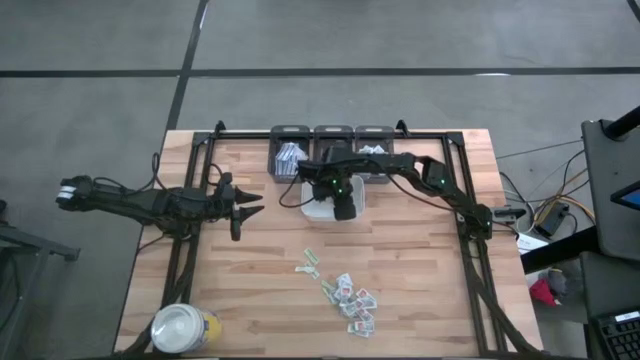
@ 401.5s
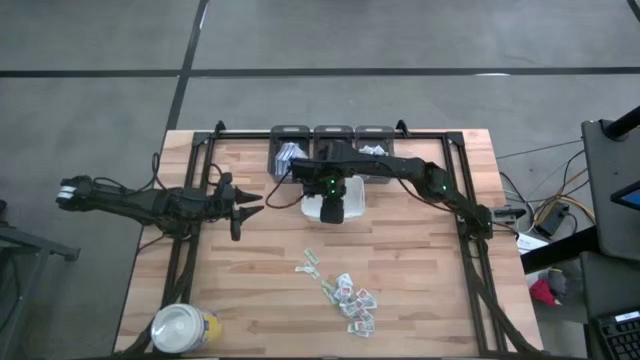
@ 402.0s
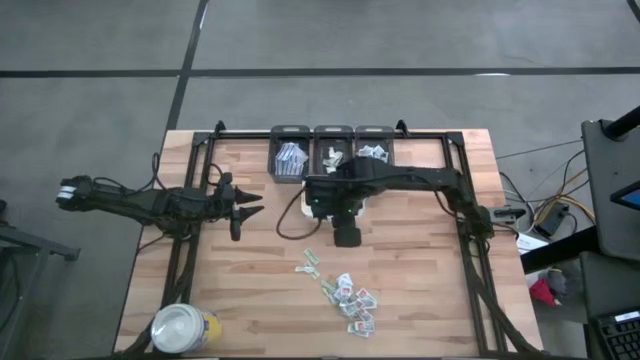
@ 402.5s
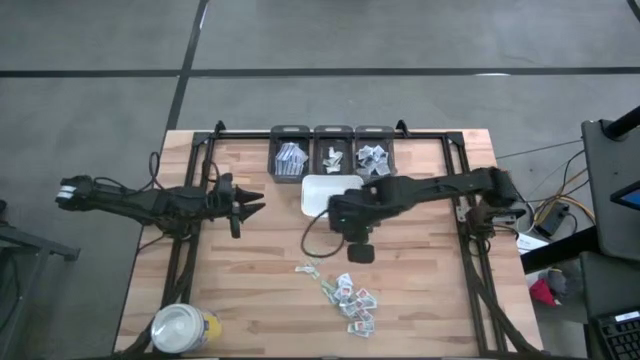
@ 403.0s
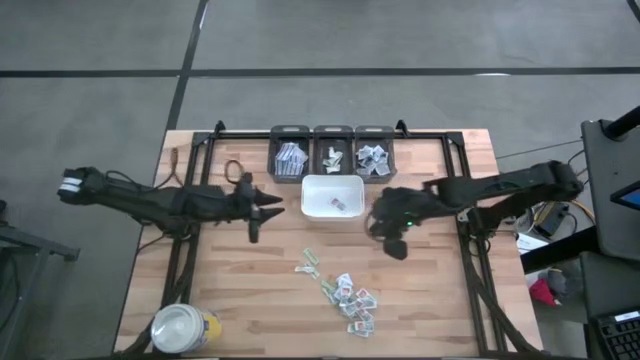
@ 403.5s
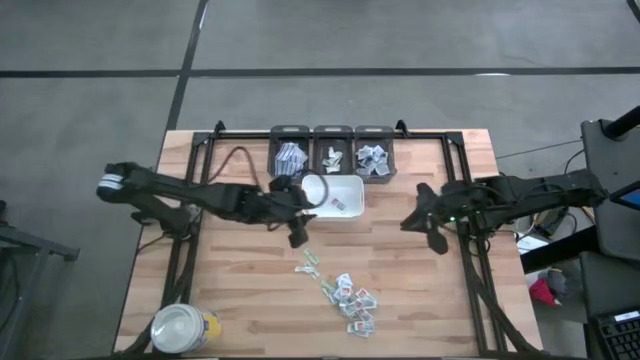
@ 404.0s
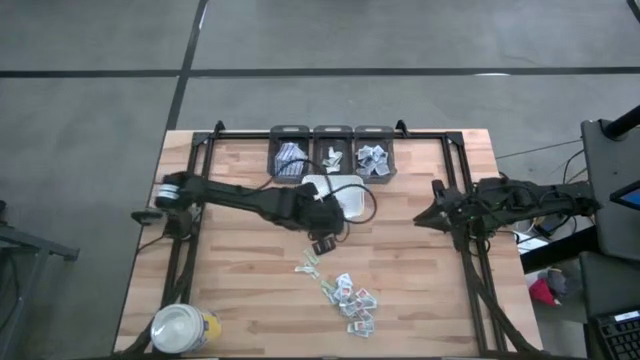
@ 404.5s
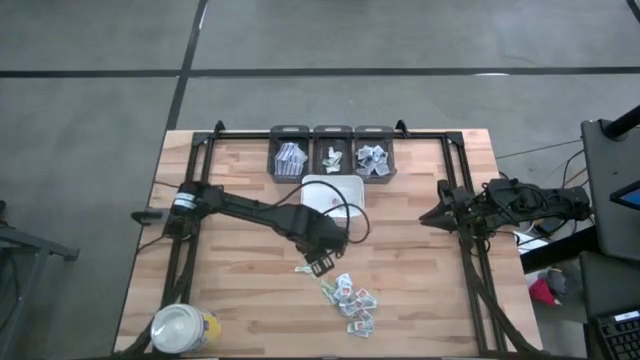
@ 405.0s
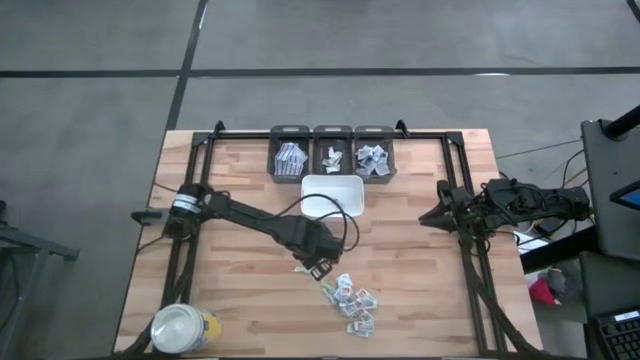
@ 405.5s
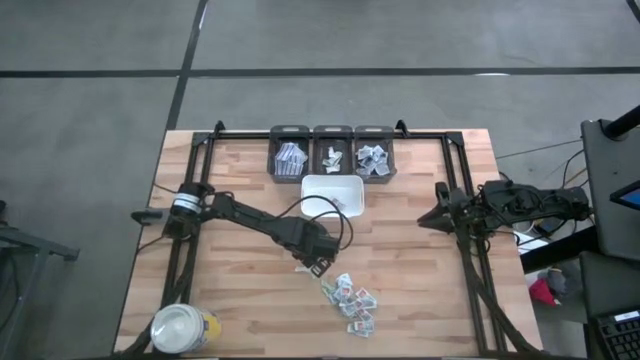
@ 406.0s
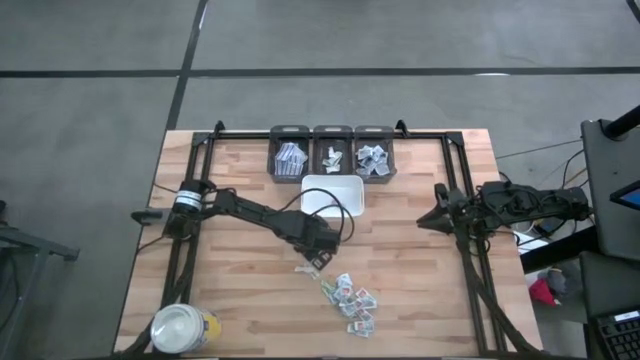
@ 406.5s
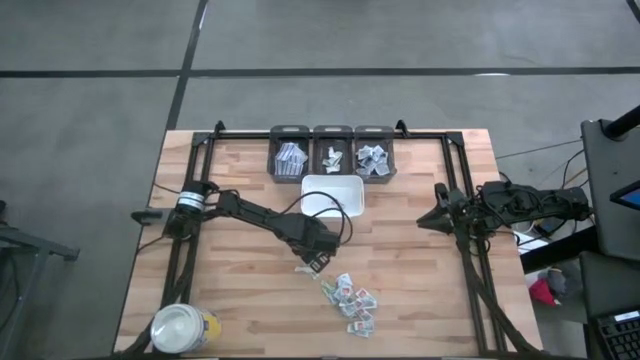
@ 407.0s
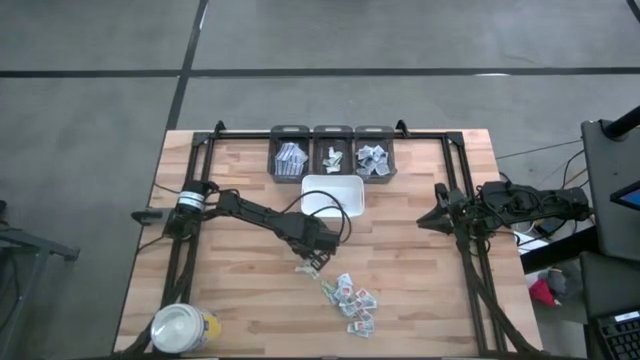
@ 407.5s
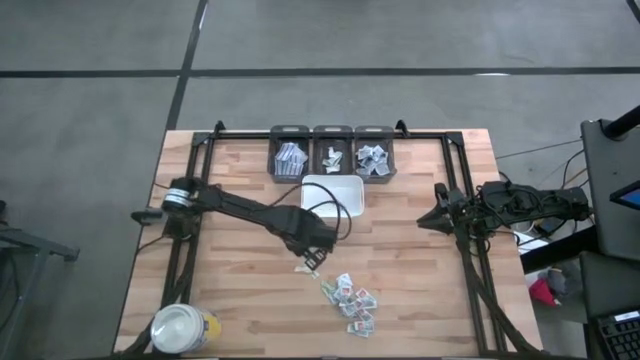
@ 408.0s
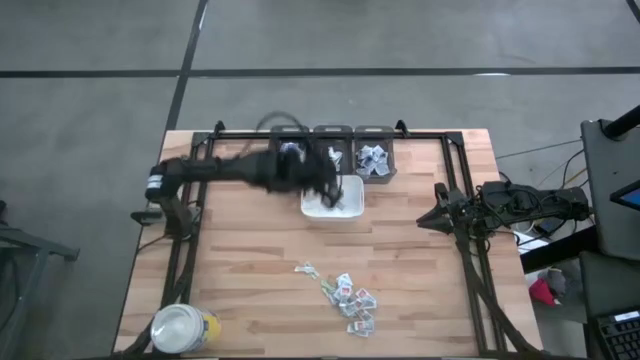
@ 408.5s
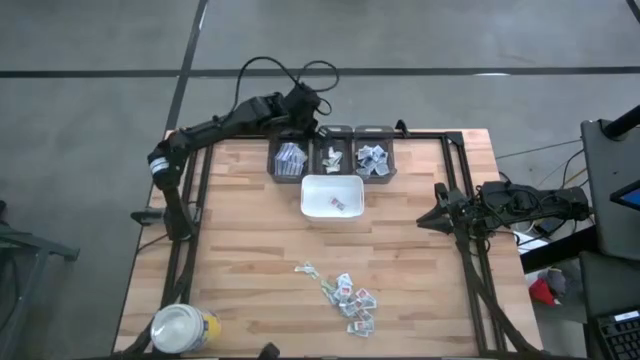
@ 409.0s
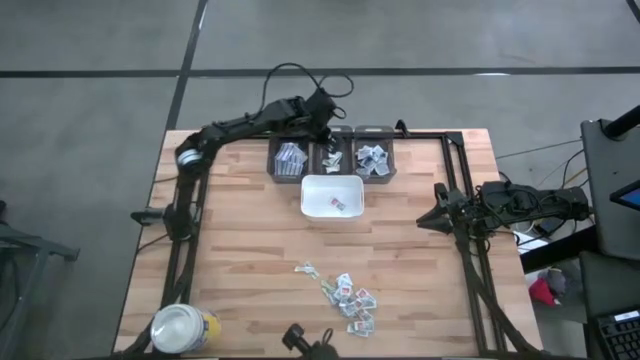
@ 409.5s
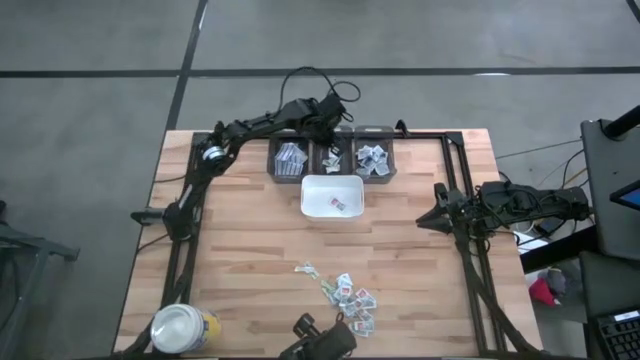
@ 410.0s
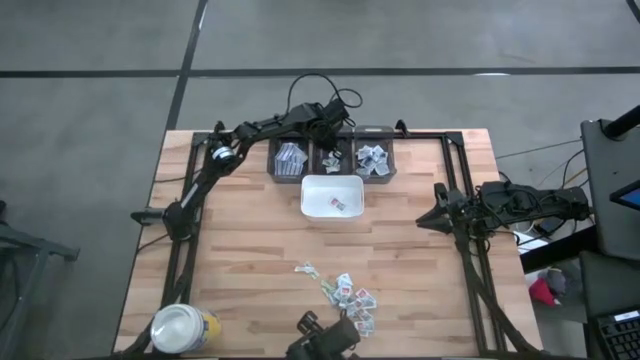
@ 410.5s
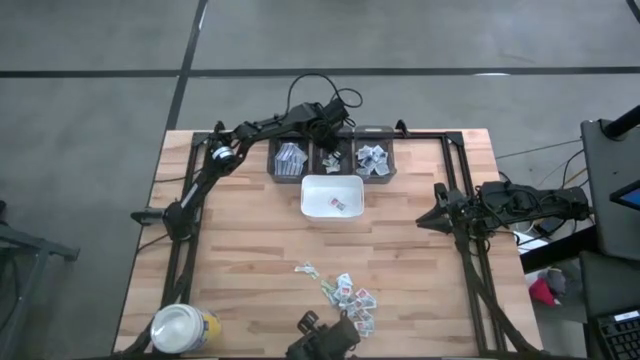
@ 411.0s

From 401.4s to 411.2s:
Task: Pick & Place First Aid Supplies
Put the green band aid into the middle black bin

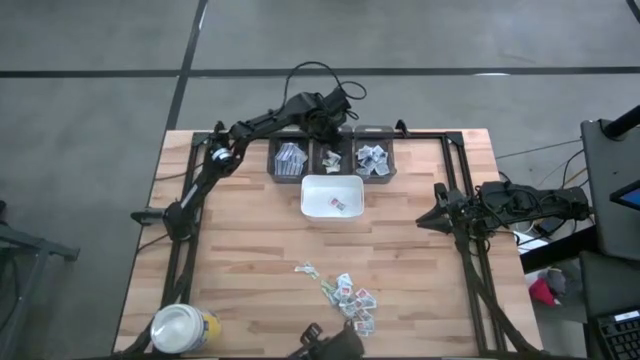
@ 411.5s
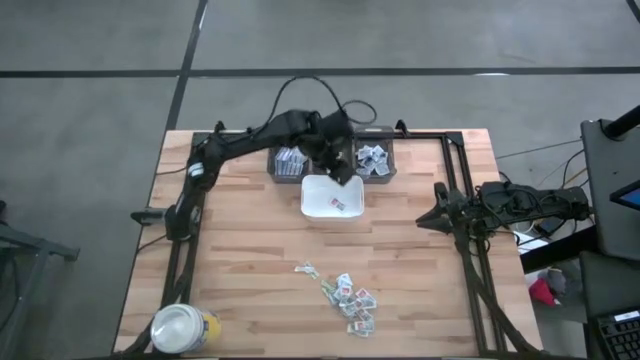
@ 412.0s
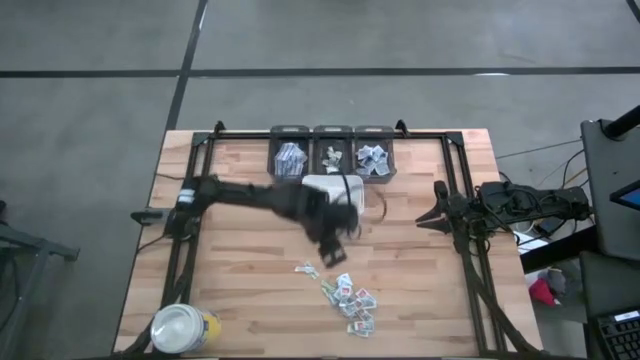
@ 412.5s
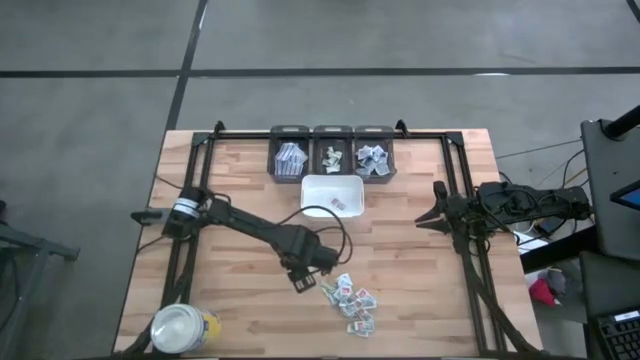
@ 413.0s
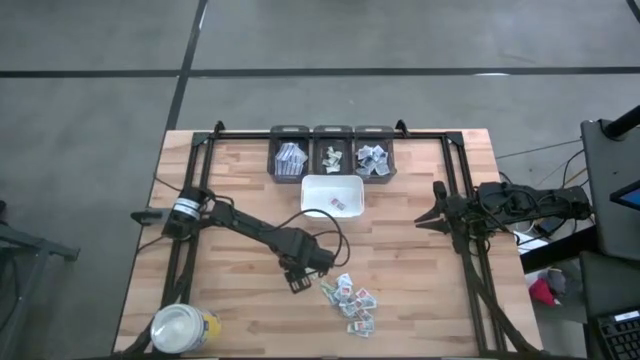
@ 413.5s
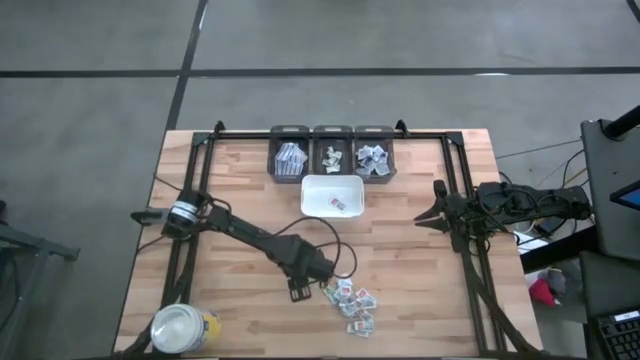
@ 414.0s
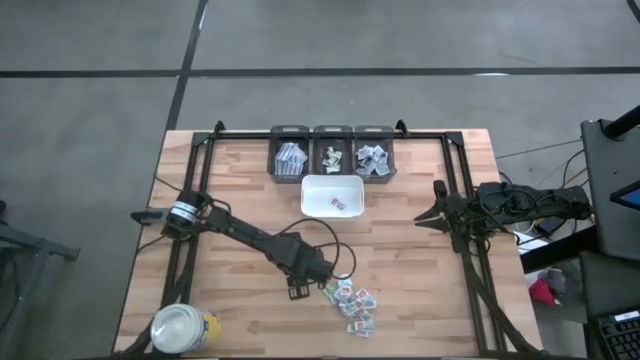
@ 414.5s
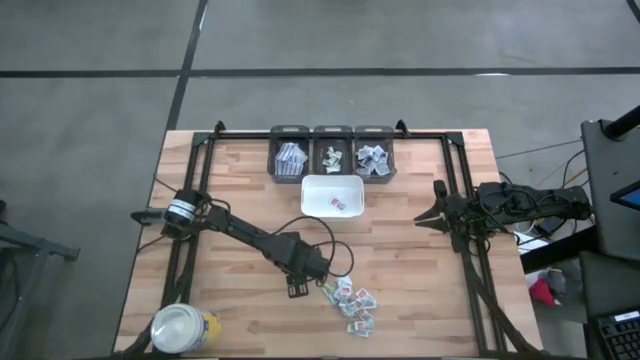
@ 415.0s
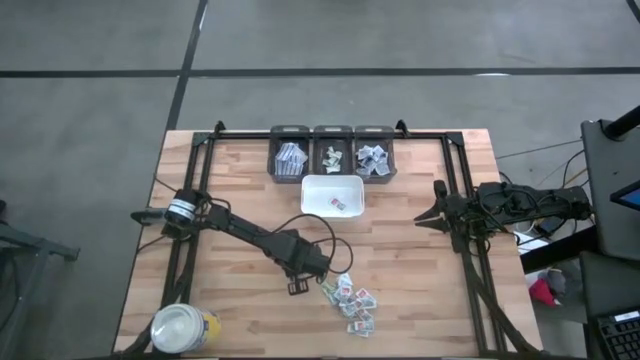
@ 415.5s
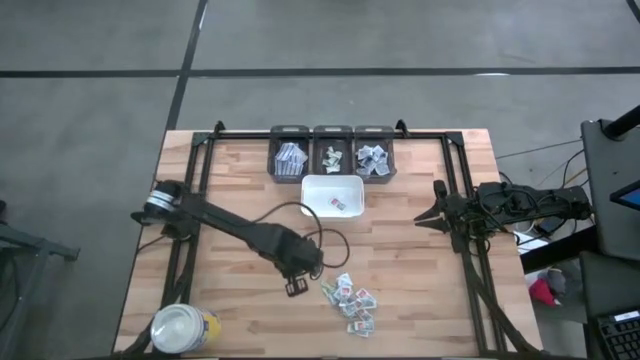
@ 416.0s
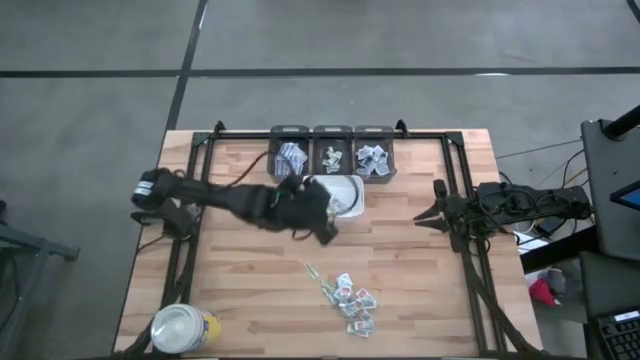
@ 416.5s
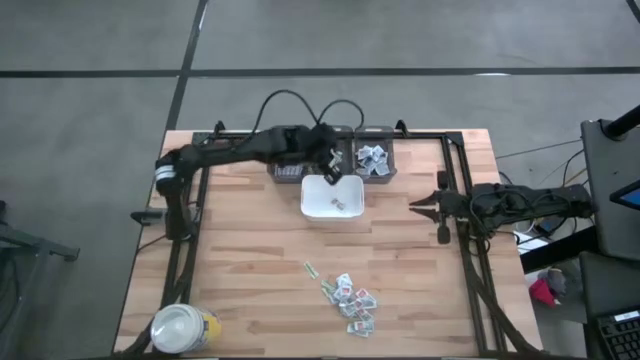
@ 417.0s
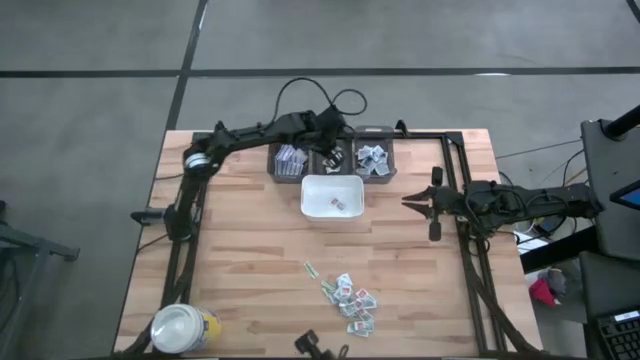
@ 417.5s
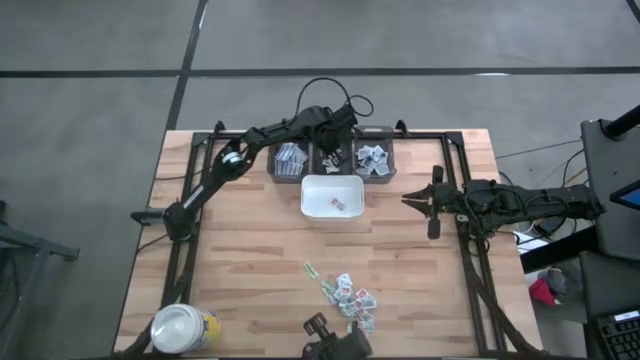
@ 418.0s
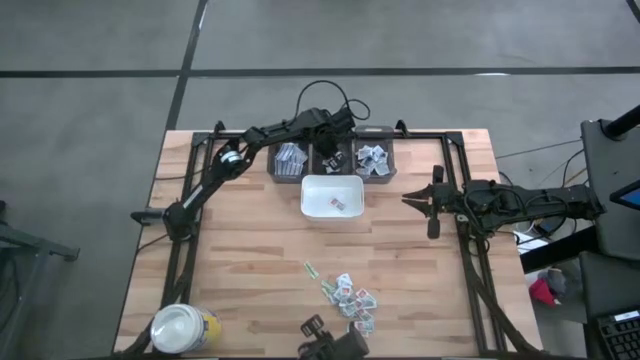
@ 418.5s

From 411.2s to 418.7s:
Put the green band aid into the middle black bin
